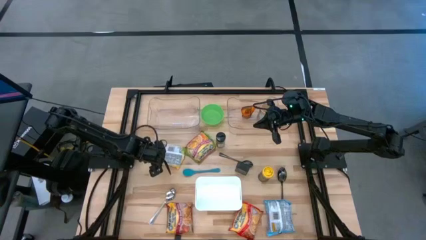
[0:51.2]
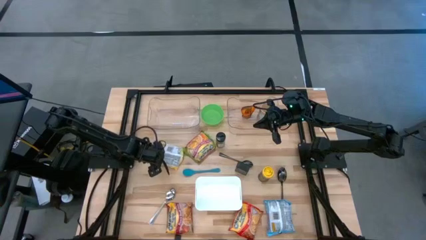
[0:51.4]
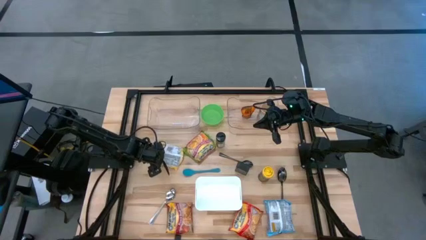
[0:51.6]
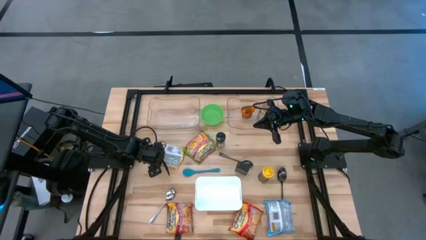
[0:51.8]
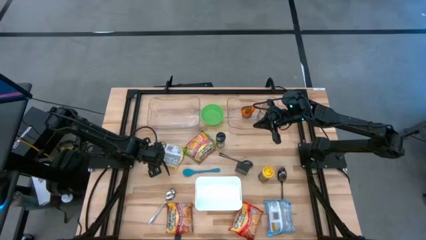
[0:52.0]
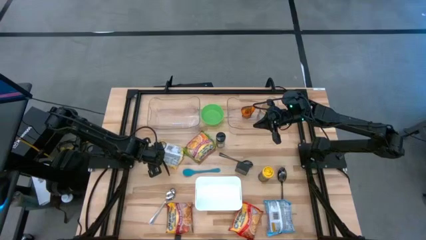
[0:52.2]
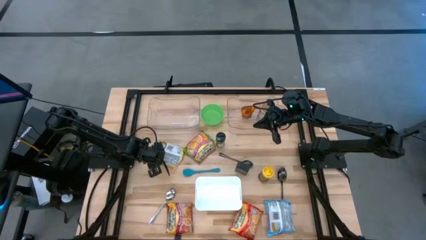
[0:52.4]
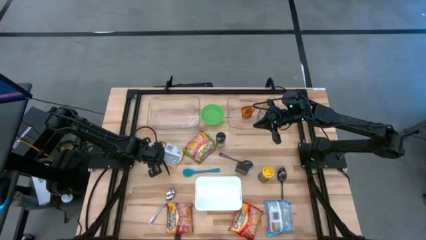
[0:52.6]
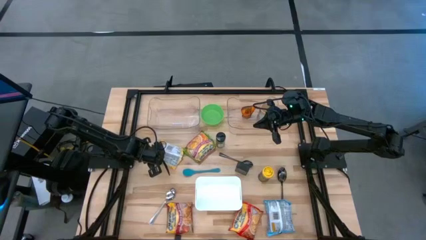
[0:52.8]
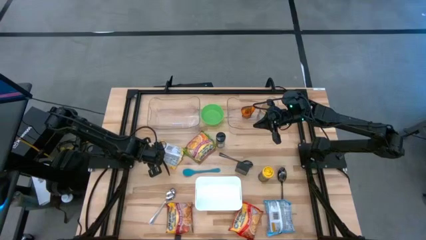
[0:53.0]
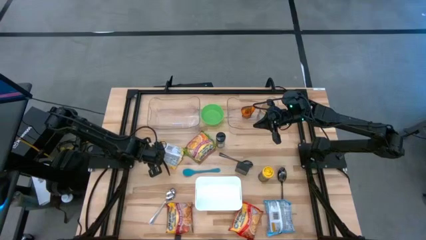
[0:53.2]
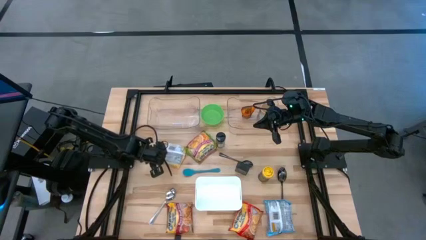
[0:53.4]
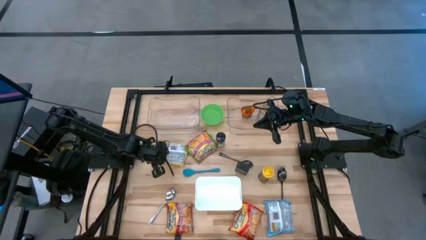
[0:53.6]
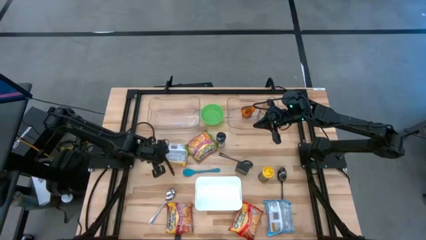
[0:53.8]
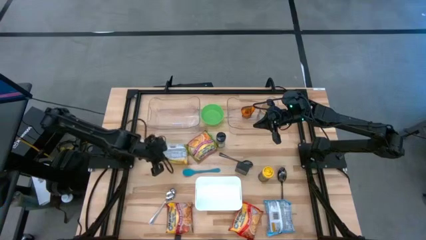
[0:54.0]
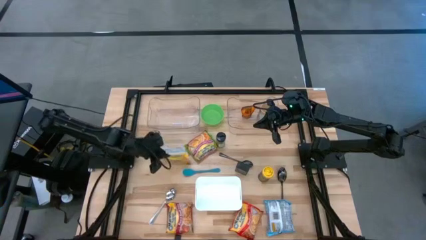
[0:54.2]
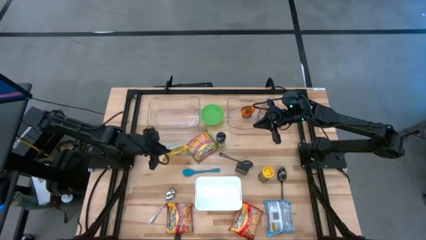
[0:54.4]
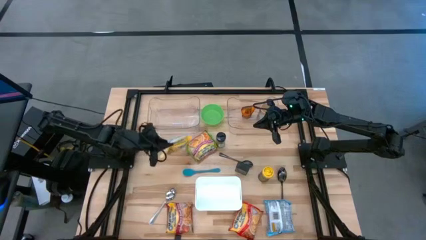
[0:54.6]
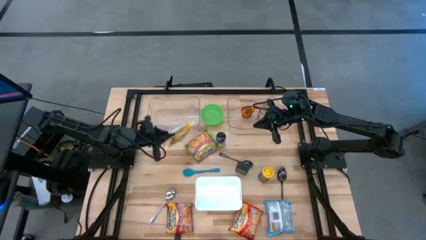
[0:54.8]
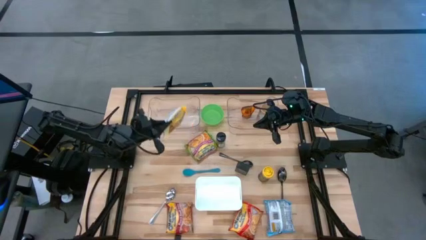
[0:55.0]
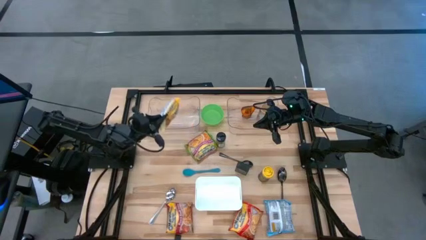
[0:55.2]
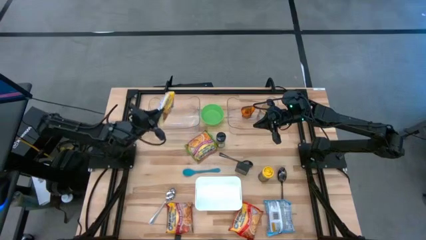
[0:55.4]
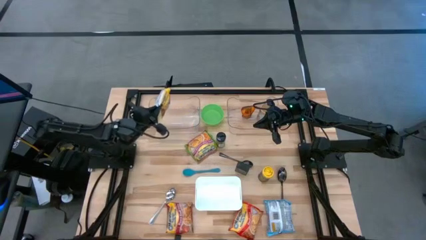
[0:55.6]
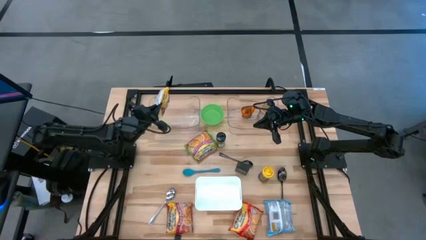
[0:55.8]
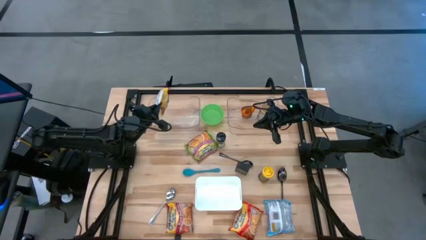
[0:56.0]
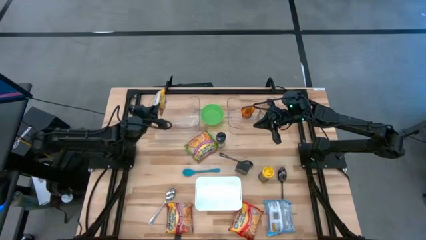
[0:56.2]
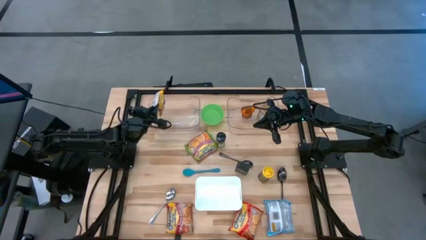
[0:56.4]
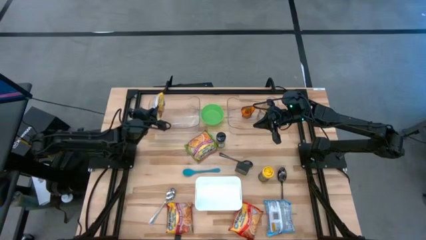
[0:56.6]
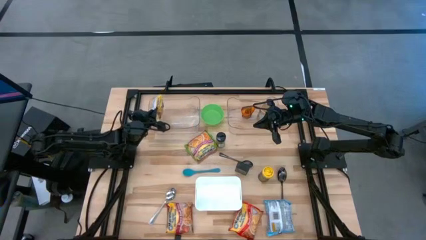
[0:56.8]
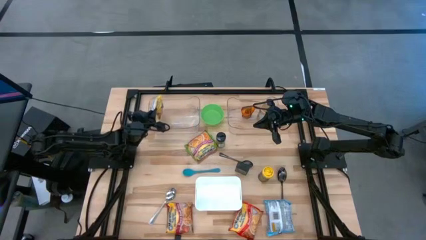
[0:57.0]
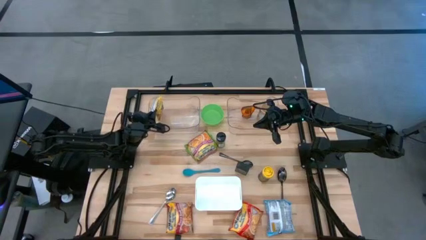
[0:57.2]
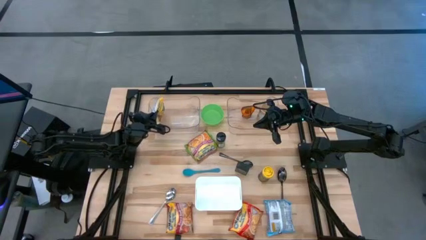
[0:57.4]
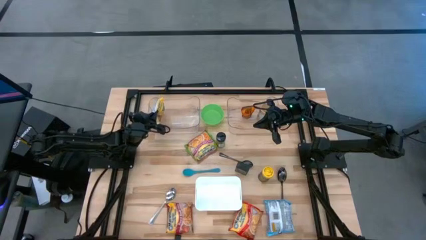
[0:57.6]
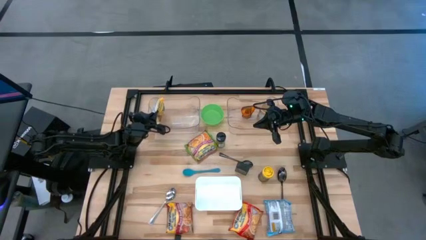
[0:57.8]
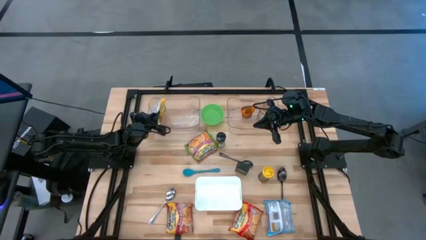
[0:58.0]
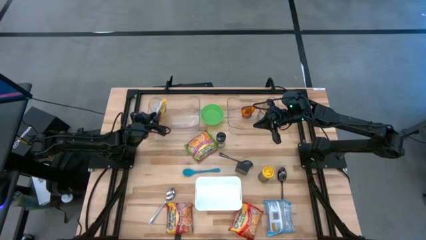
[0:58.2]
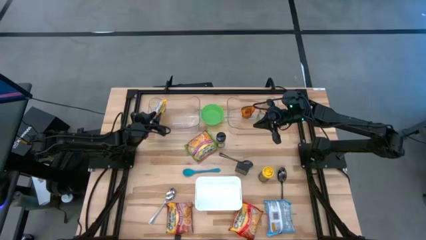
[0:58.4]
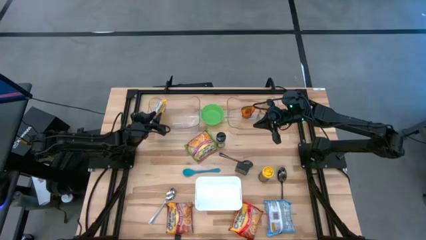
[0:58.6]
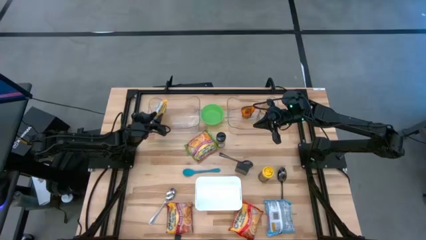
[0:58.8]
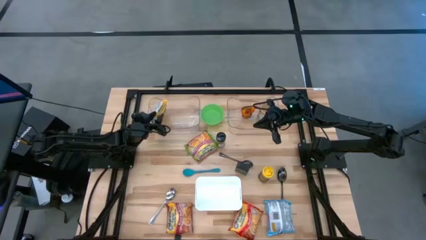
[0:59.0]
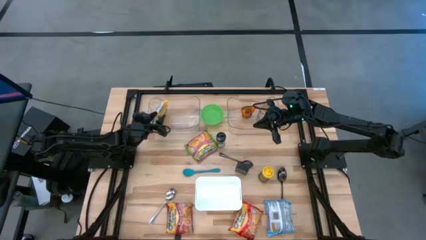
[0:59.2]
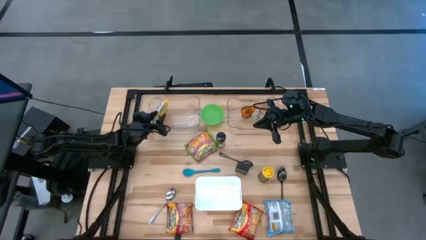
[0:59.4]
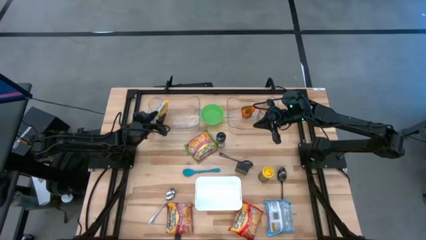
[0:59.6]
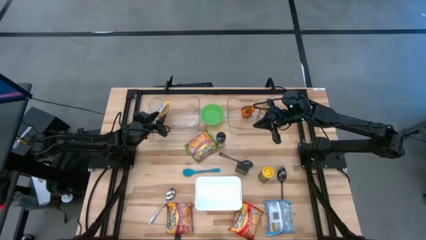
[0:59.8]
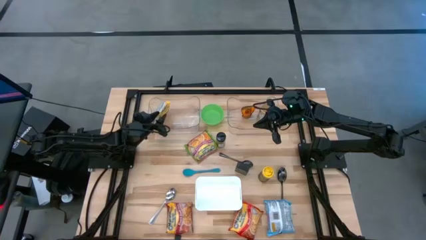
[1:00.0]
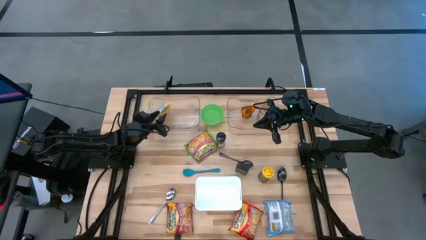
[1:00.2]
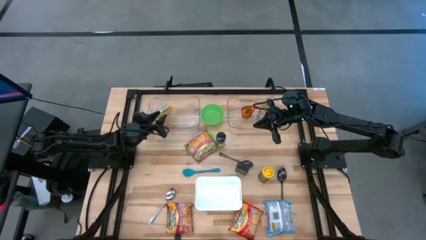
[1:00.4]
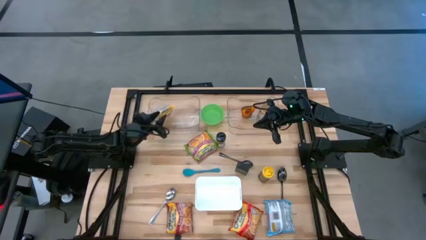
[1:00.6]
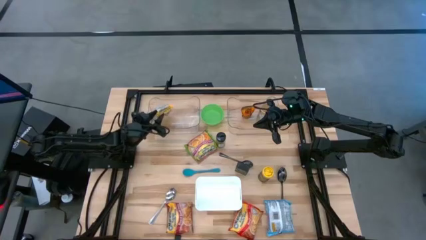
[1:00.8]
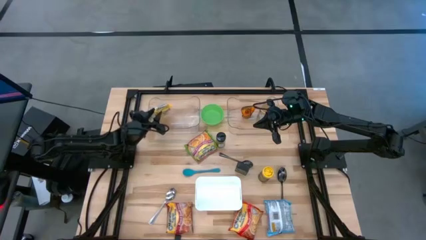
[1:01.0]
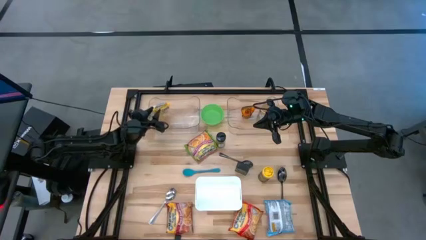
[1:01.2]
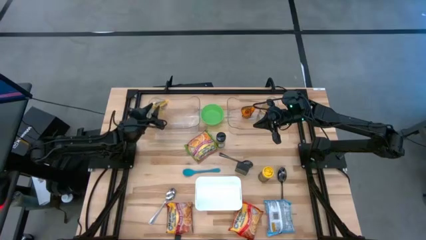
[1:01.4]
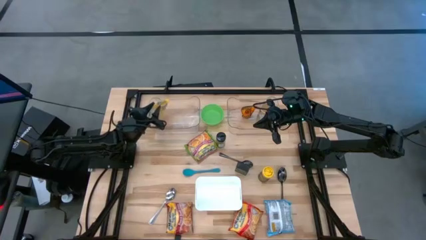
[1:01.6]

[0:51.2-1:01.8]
Task: Pick & Place Food Item
Put the yellow noodle pack into the left transparent bin
